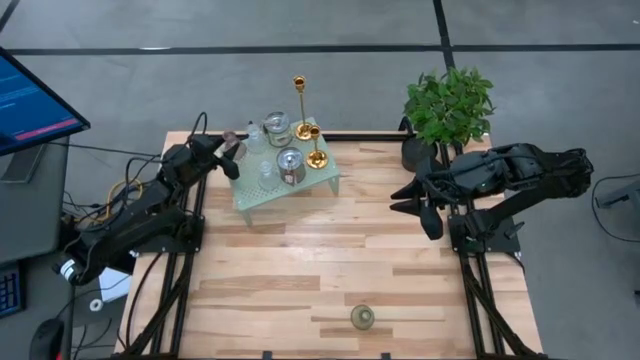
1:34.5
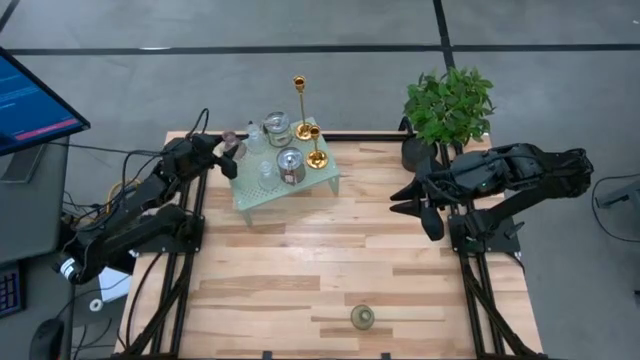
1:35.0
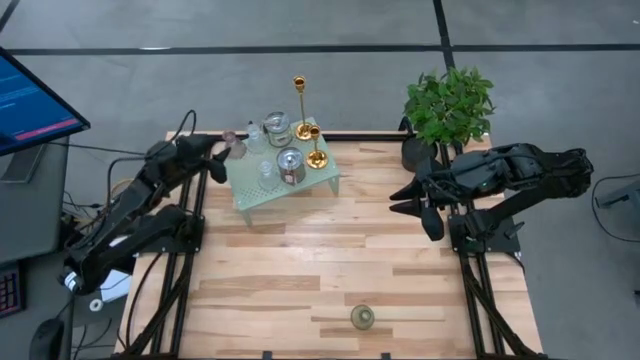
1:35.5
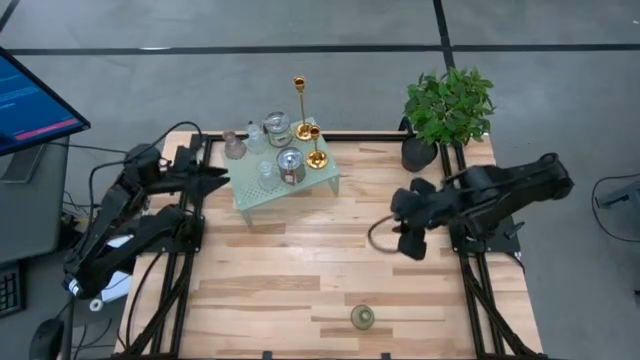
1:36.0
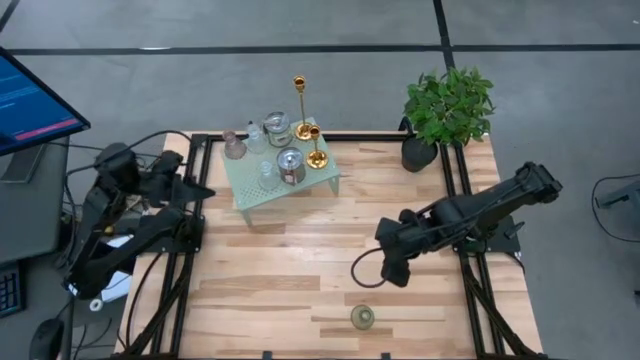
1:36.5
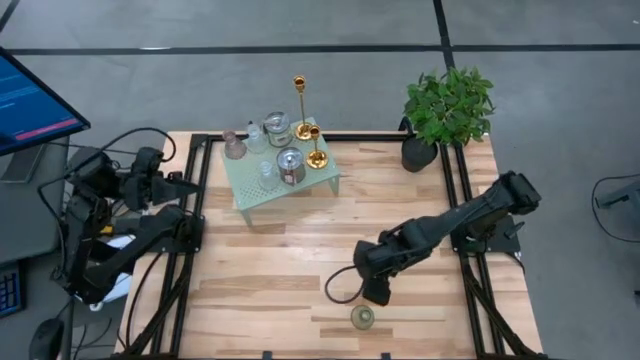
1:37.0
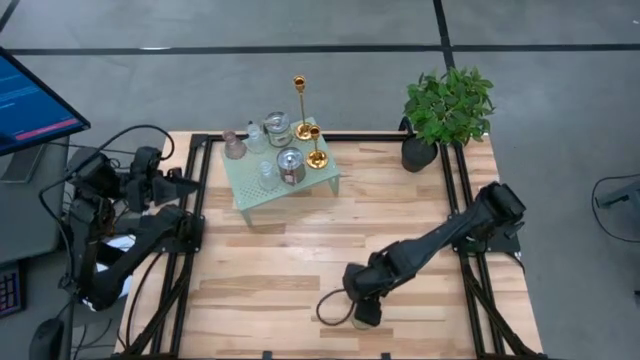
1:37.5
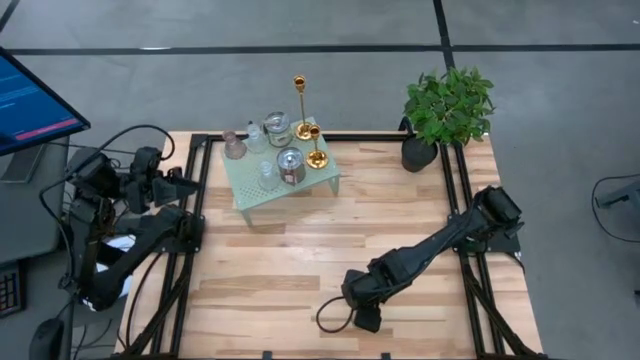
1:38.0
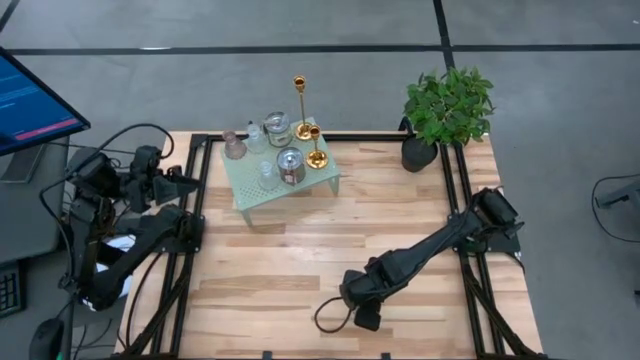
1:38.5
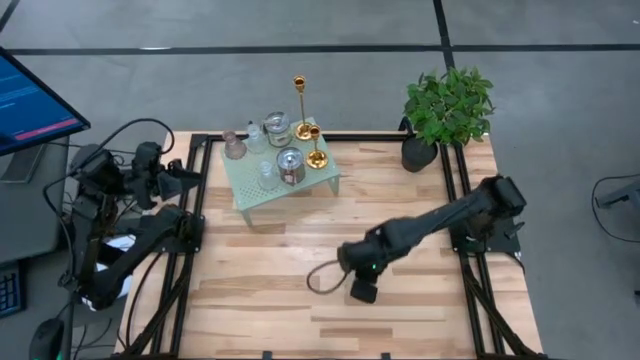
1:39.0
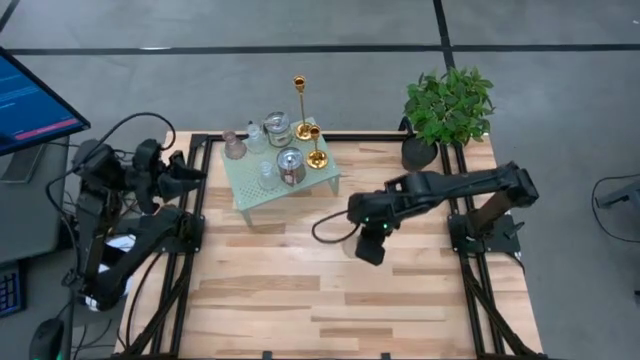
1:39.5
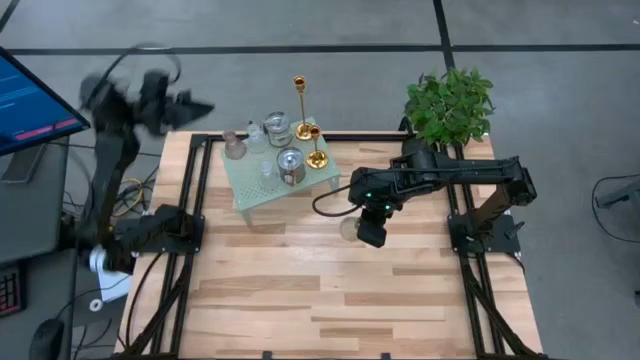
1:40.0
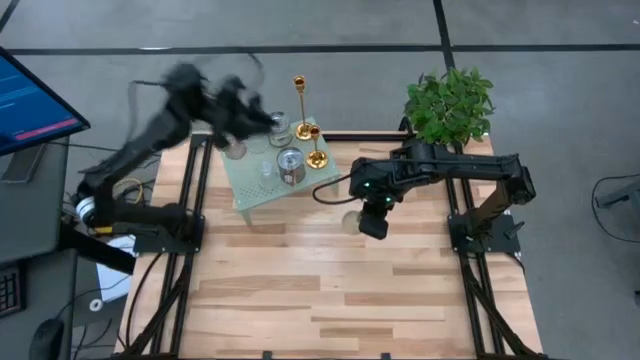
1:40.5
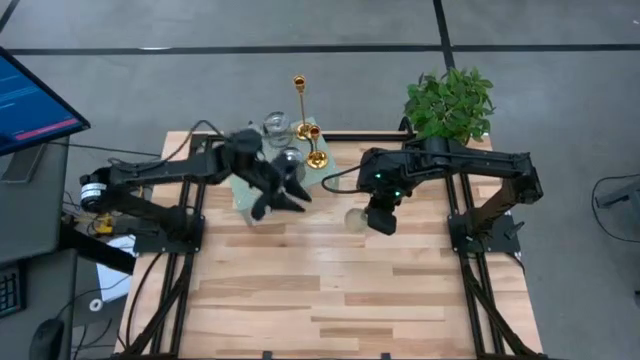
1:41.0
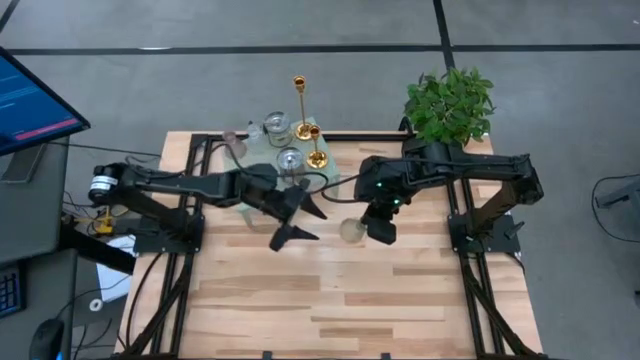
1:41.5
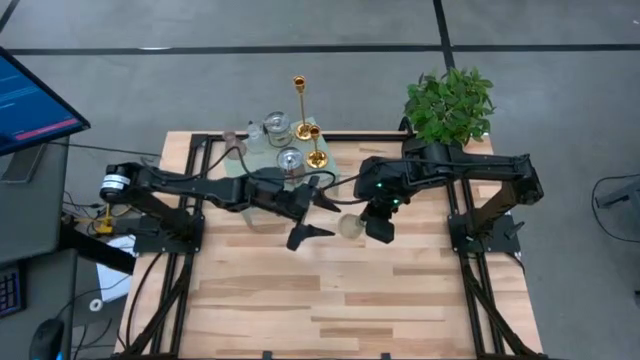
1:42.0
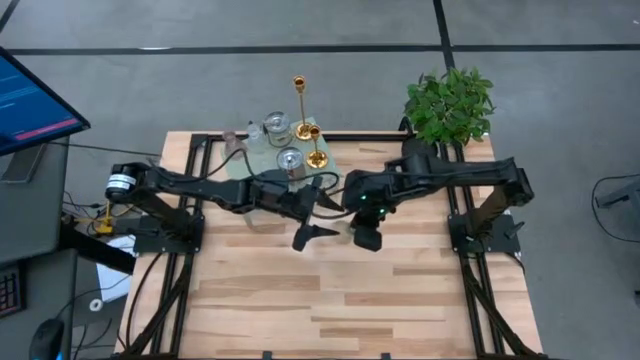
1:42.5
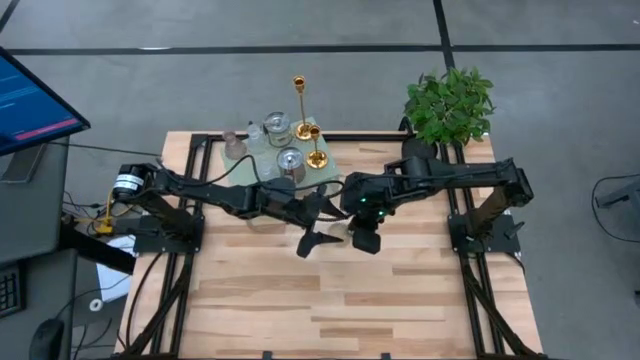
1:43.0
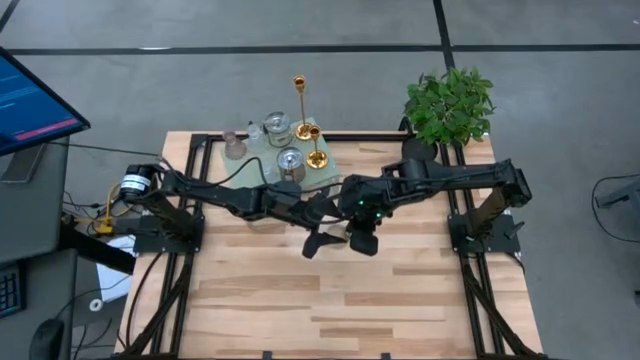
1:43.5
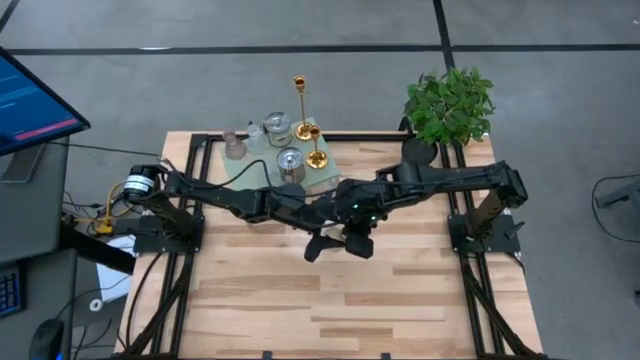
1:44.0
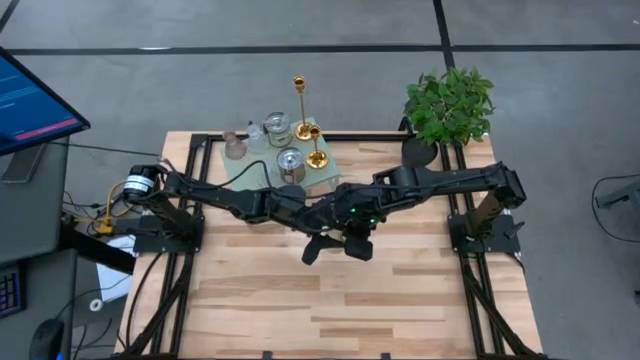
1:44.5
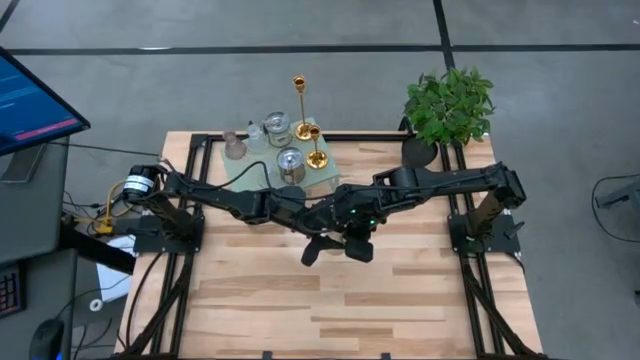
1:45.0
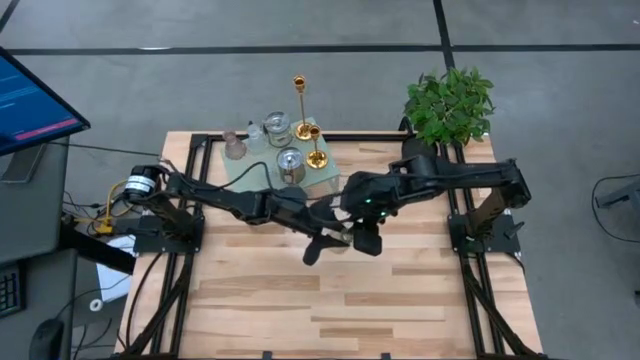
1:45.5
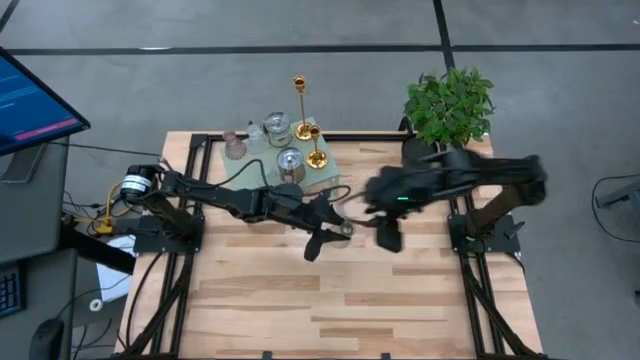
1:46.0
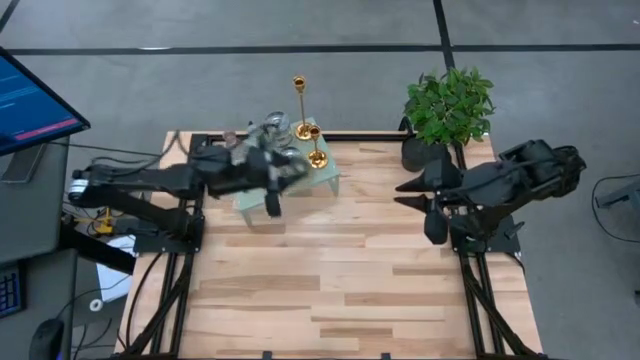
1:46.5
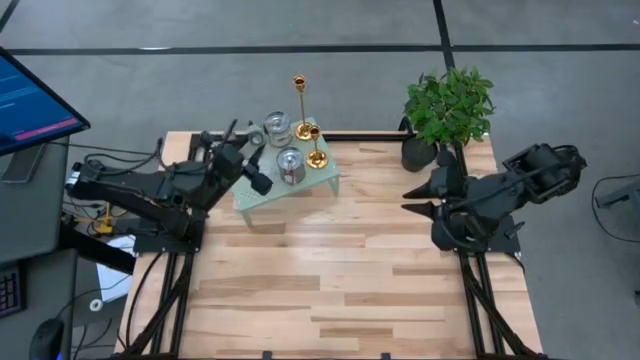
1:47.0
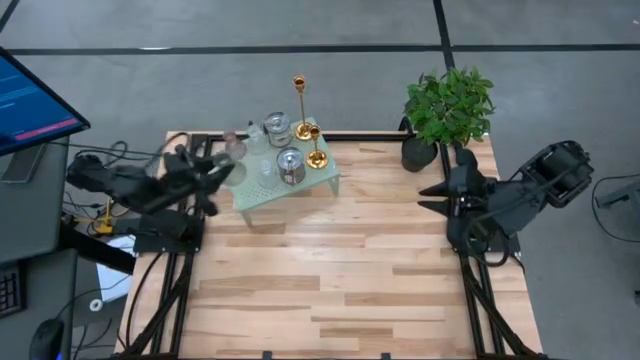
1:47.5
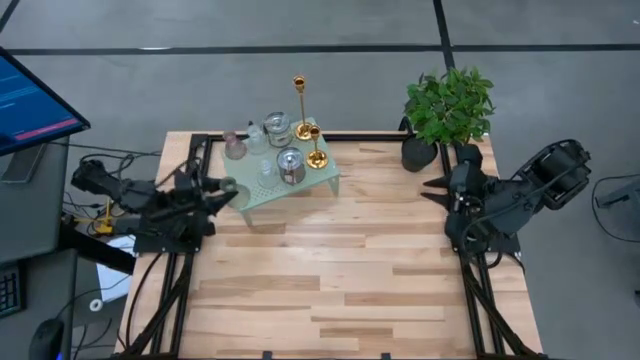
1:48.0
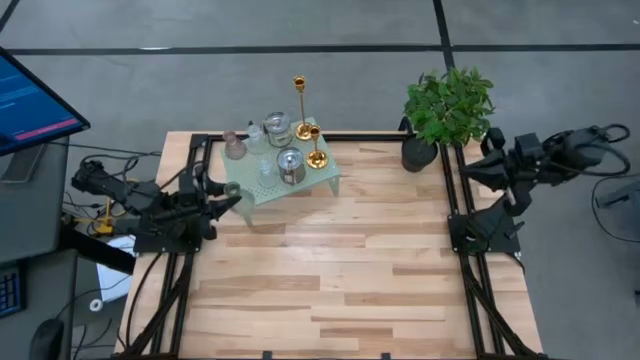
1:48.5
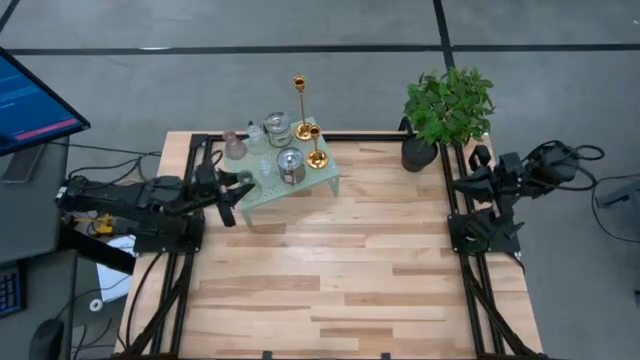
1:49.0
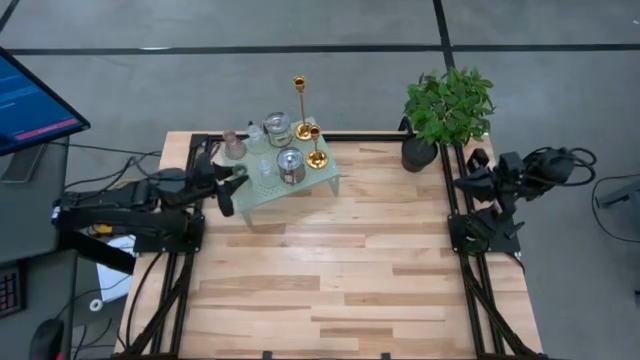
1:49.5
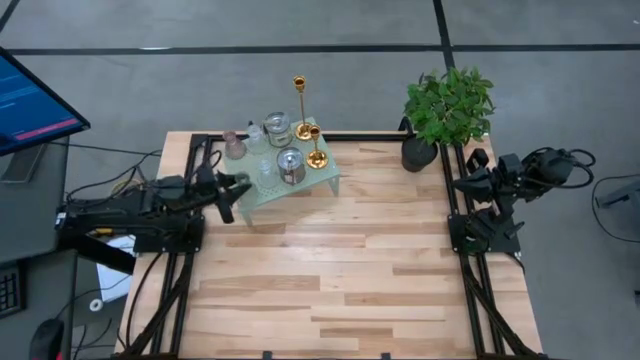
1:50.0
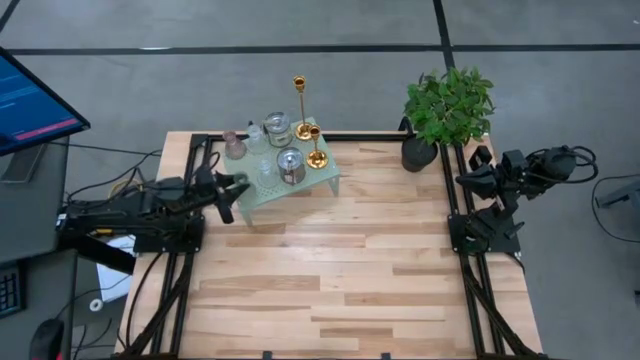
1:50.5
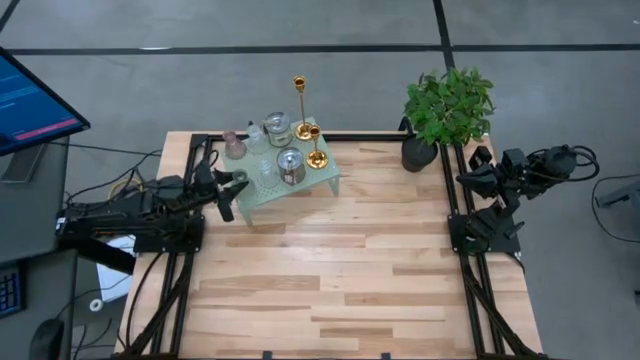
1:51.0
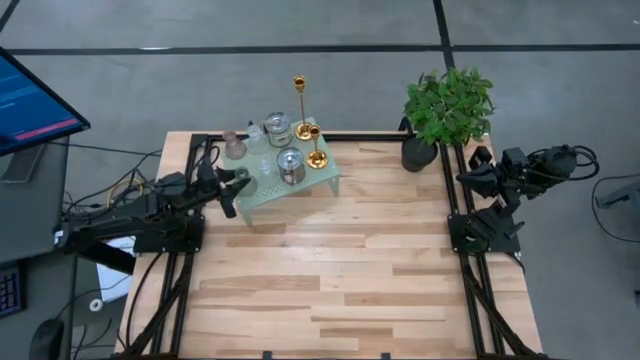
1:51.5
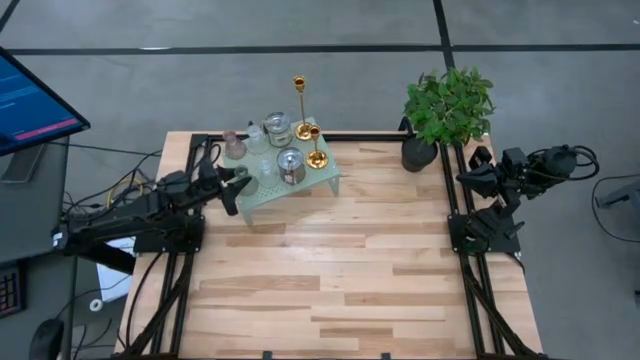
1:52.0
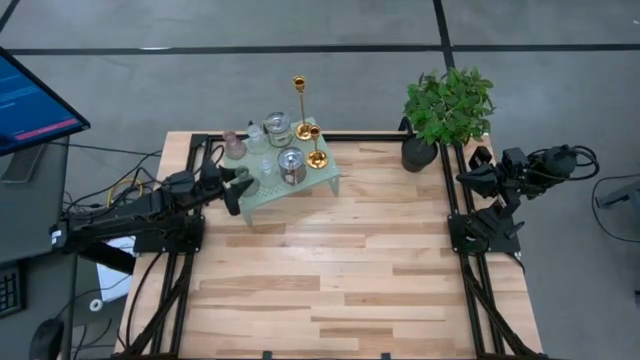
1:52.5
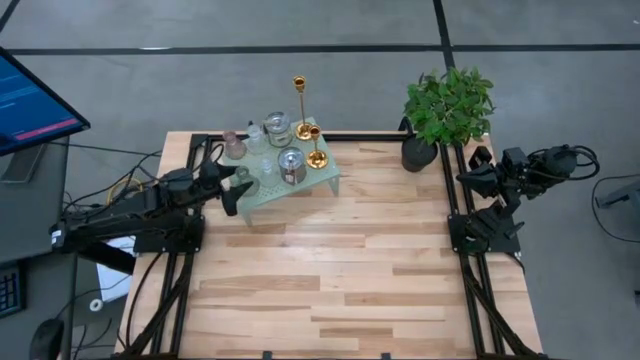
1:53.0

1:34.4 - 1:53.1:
Task: Pick & Place candle stick holders
Put the green candle holder on the shelf

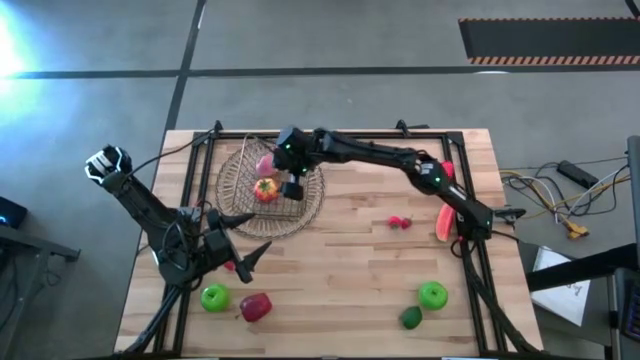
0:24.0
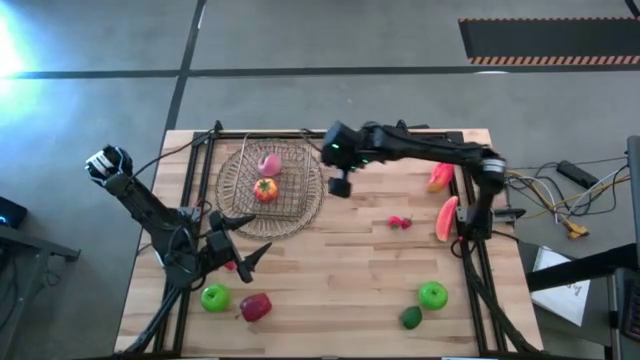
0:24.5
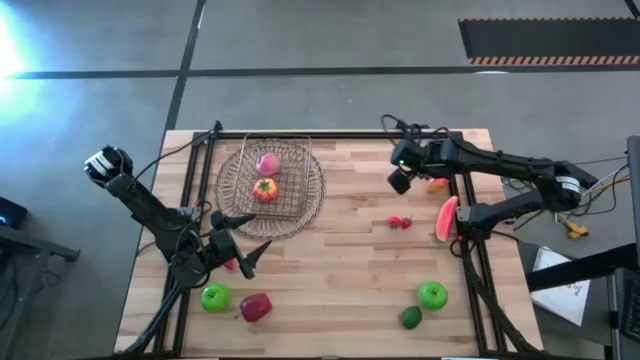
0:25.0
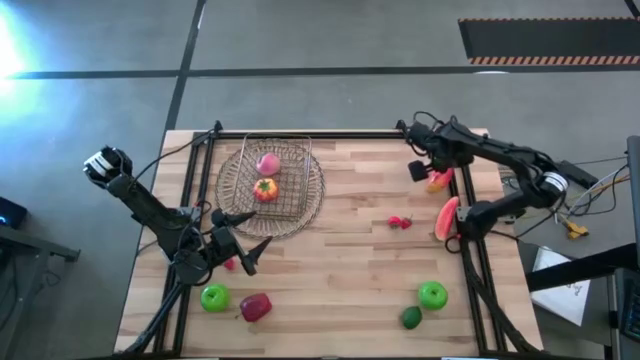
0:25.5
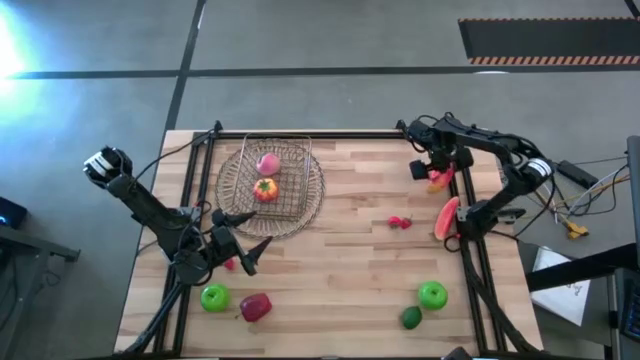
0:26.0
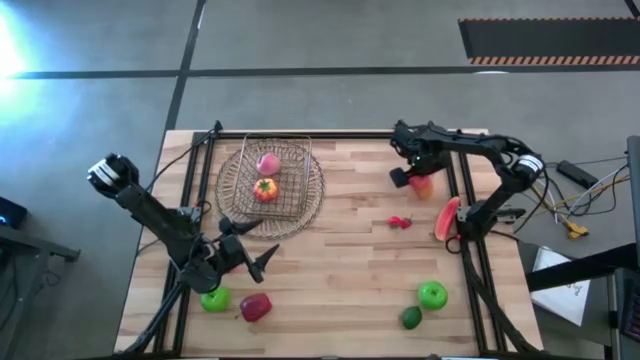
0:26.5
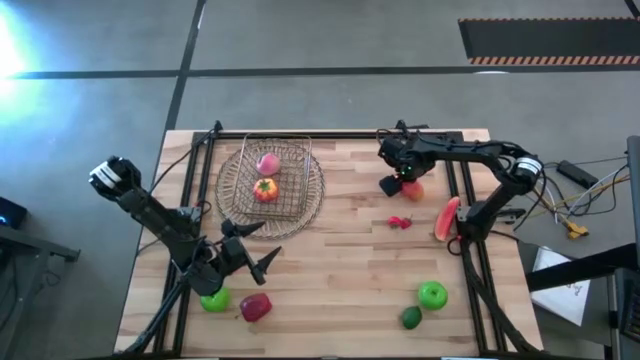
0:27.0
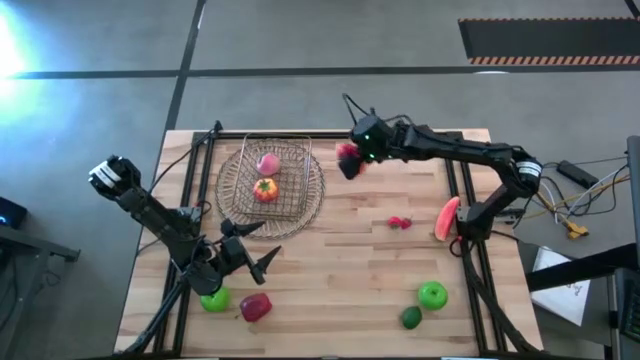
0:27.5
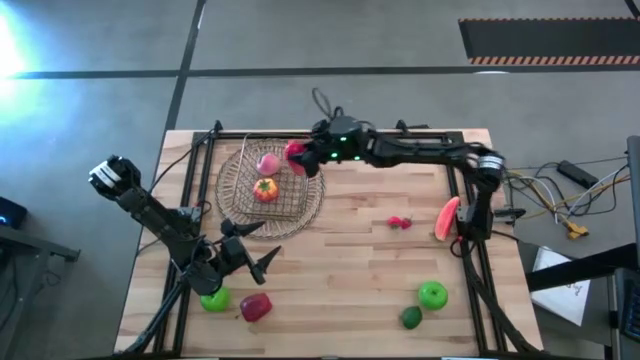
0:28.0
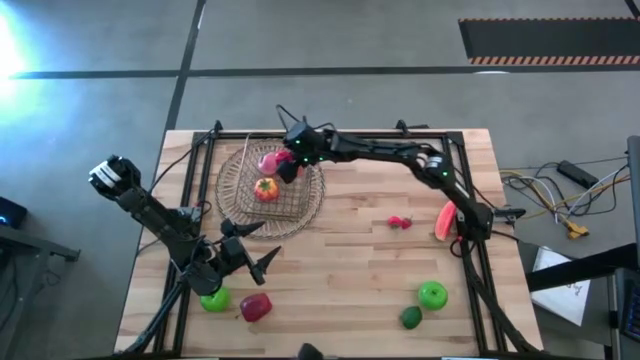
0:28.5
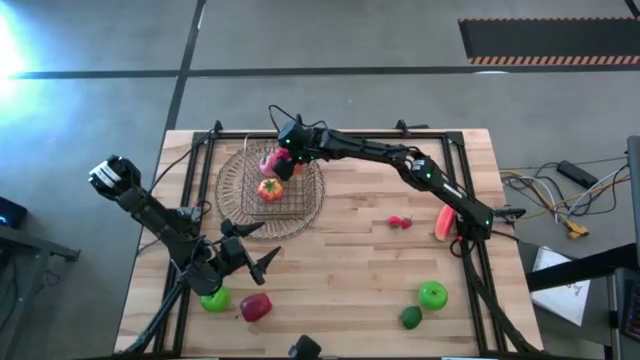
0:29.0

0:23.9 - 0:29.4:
Task: Build produce basket
Put the mango into the basket
